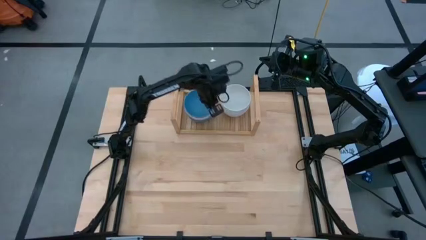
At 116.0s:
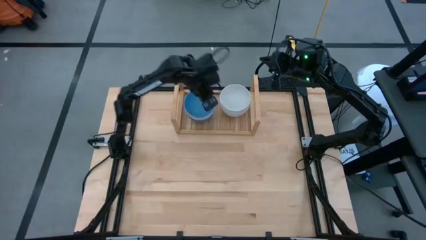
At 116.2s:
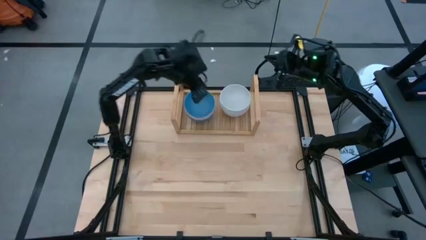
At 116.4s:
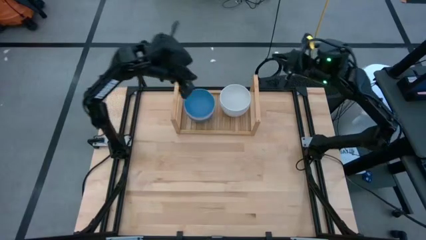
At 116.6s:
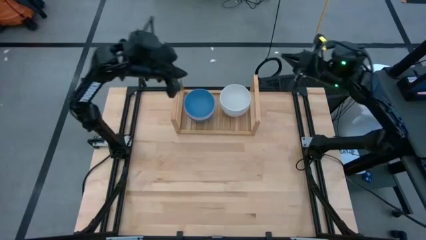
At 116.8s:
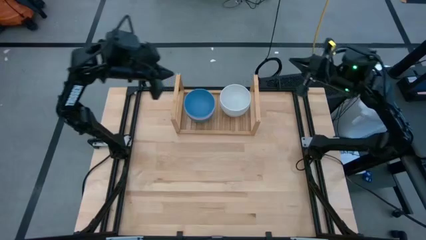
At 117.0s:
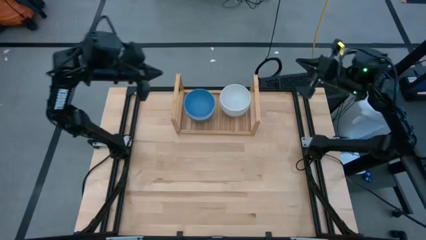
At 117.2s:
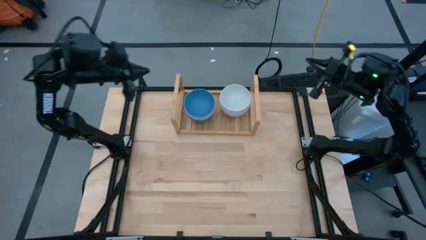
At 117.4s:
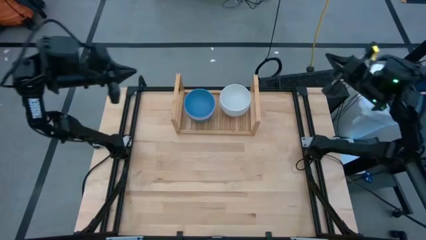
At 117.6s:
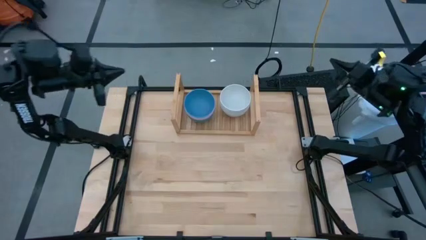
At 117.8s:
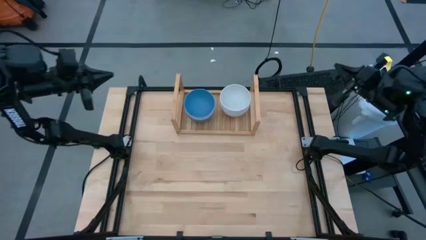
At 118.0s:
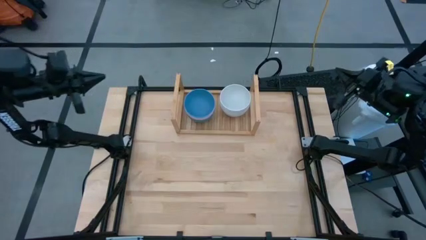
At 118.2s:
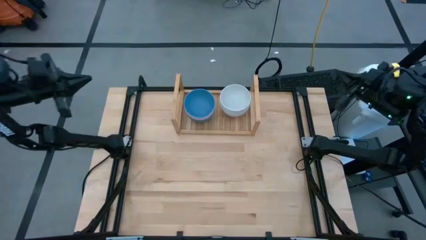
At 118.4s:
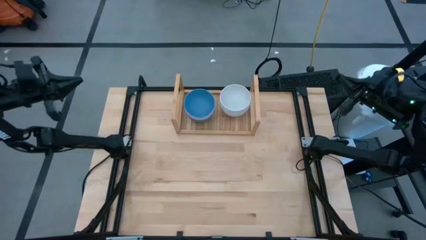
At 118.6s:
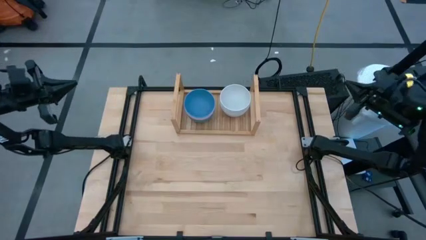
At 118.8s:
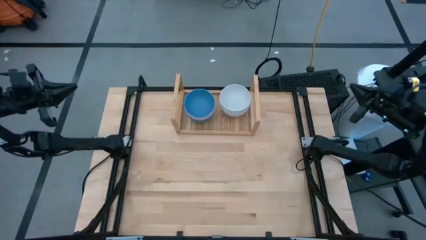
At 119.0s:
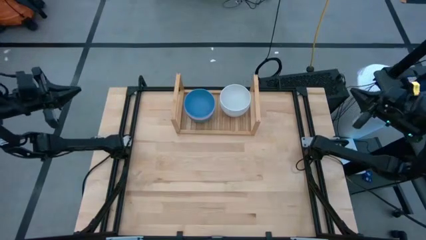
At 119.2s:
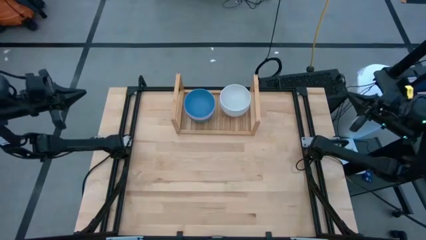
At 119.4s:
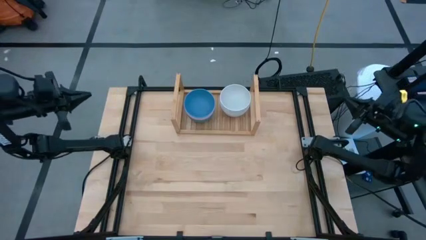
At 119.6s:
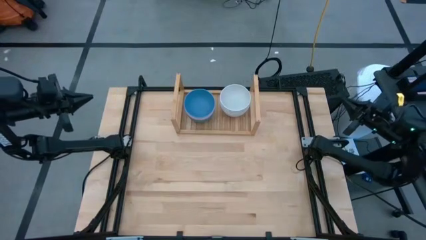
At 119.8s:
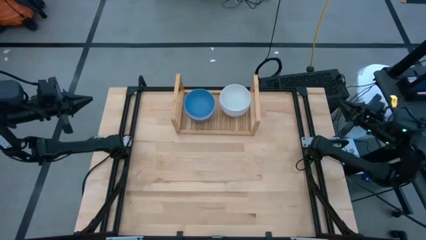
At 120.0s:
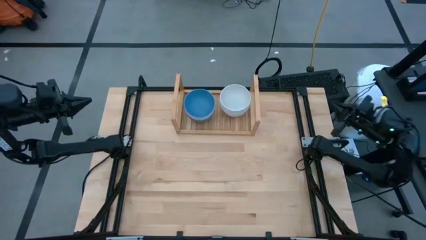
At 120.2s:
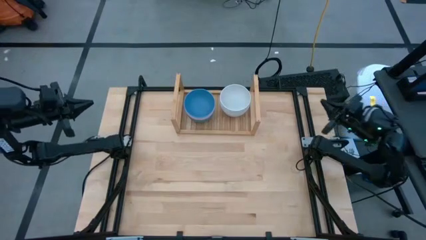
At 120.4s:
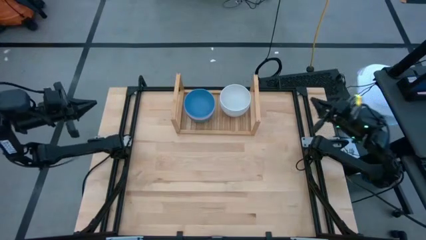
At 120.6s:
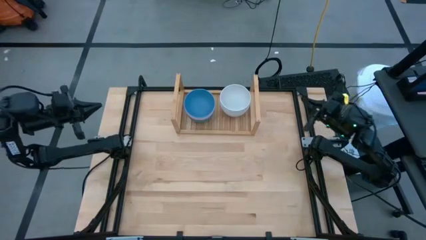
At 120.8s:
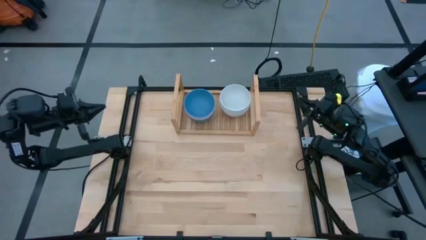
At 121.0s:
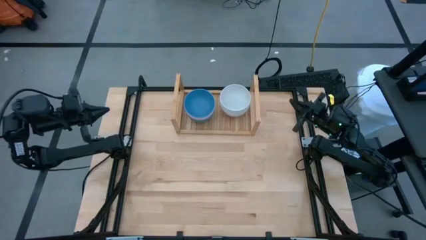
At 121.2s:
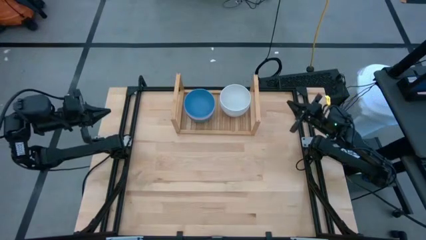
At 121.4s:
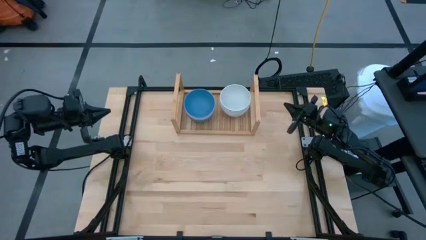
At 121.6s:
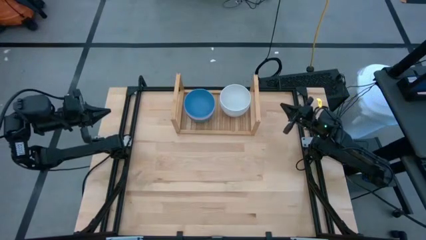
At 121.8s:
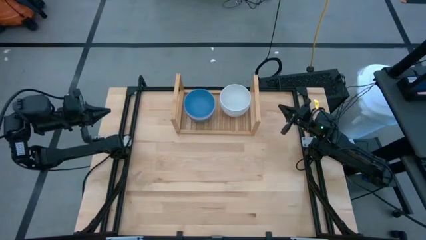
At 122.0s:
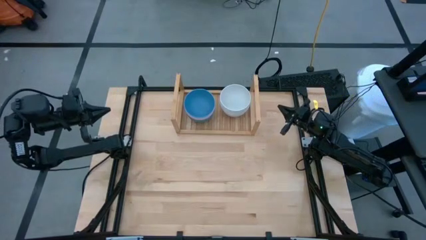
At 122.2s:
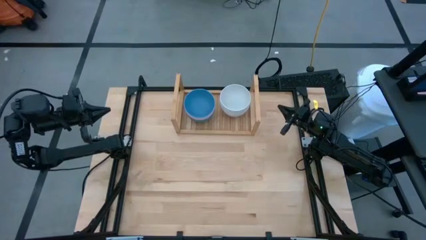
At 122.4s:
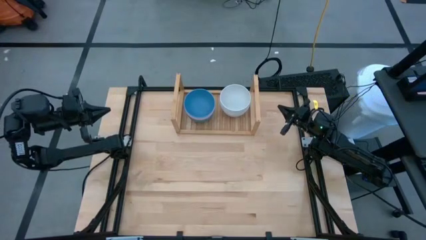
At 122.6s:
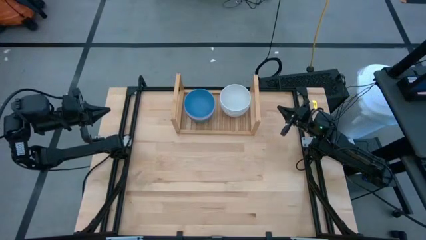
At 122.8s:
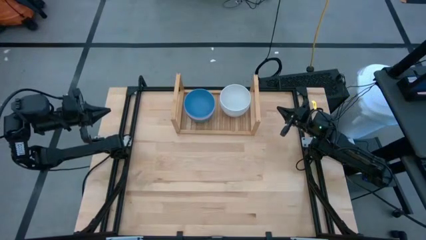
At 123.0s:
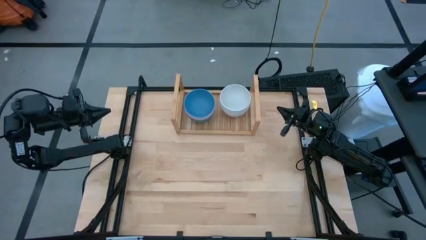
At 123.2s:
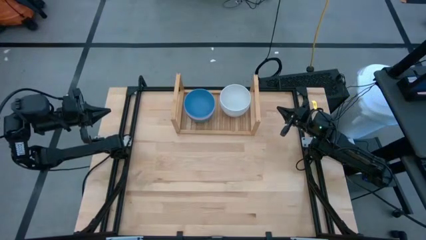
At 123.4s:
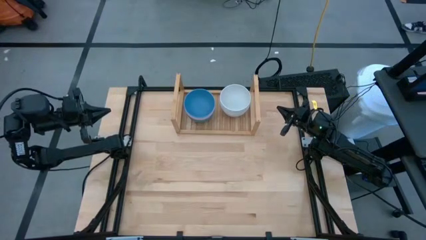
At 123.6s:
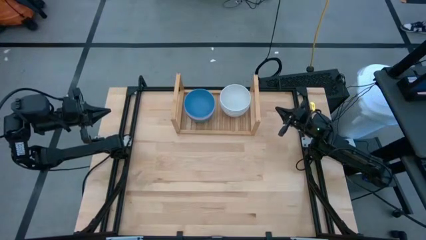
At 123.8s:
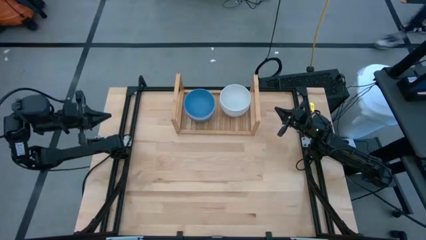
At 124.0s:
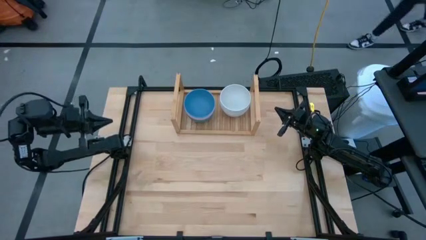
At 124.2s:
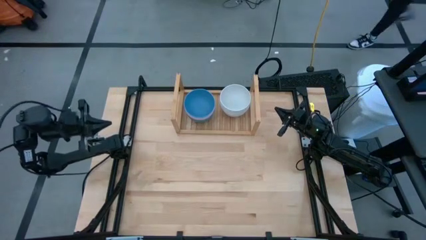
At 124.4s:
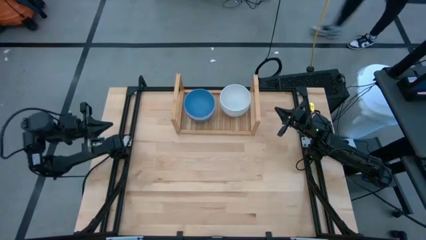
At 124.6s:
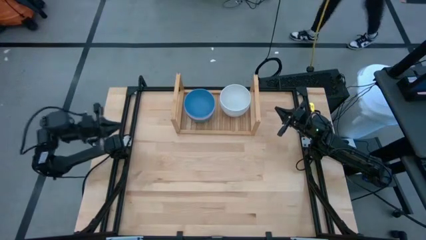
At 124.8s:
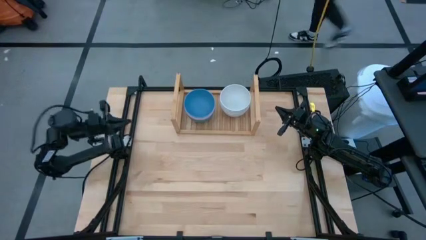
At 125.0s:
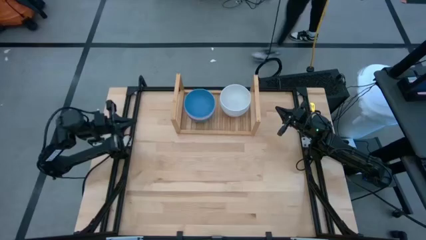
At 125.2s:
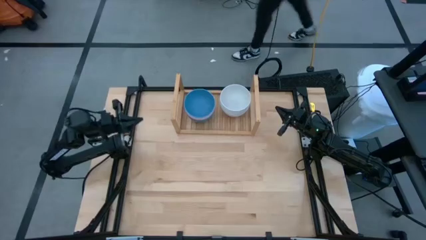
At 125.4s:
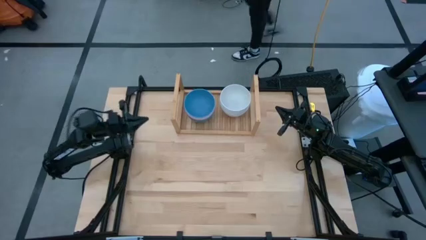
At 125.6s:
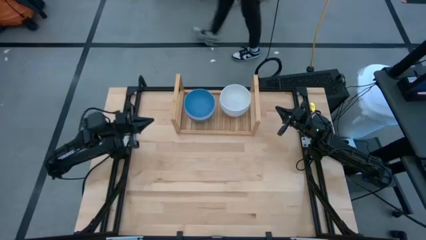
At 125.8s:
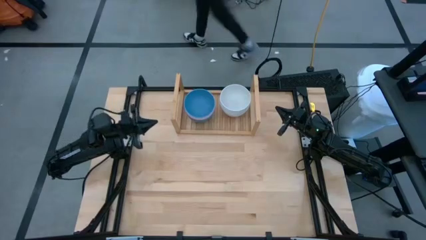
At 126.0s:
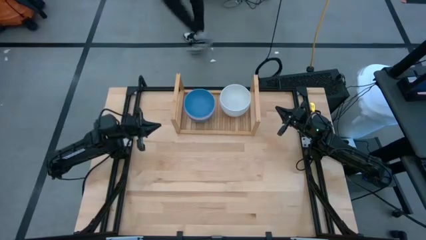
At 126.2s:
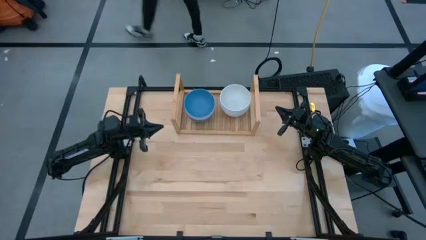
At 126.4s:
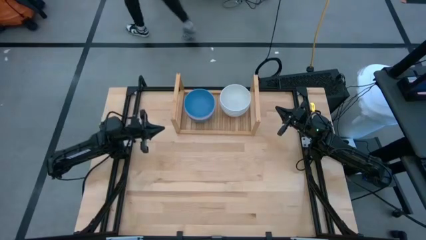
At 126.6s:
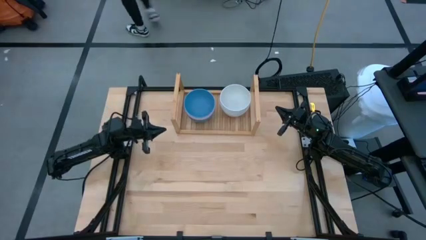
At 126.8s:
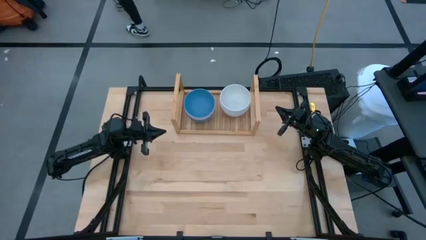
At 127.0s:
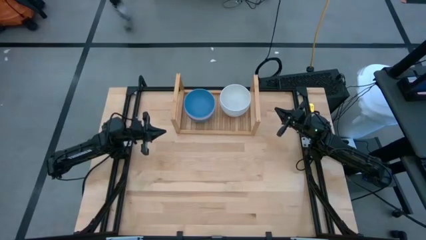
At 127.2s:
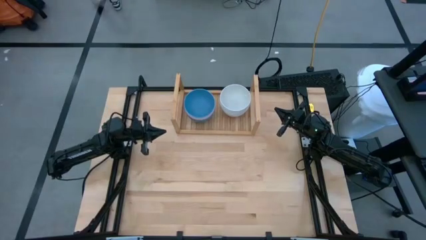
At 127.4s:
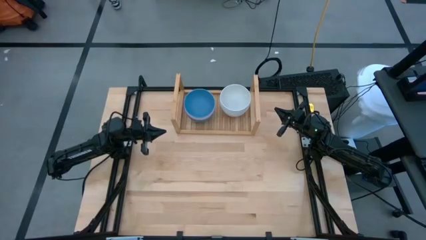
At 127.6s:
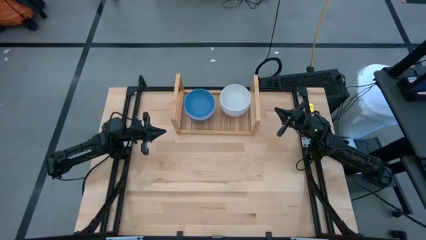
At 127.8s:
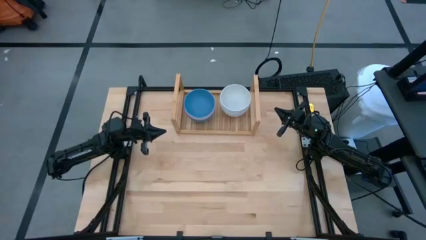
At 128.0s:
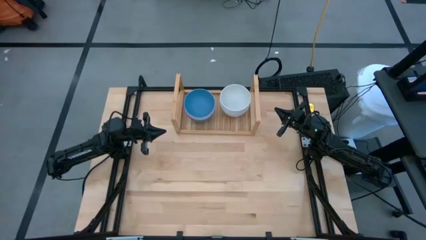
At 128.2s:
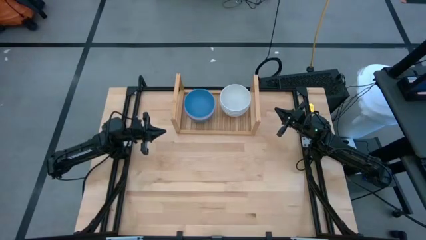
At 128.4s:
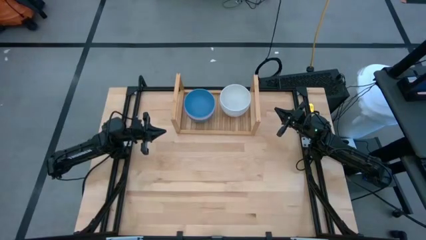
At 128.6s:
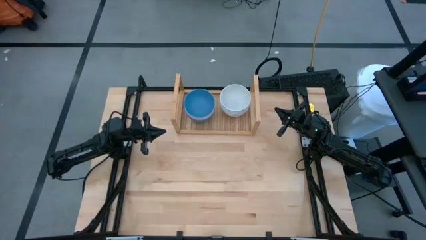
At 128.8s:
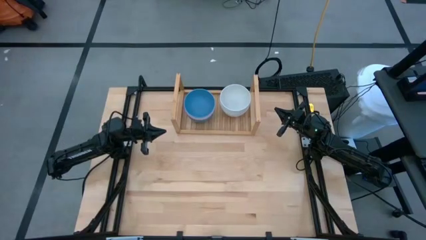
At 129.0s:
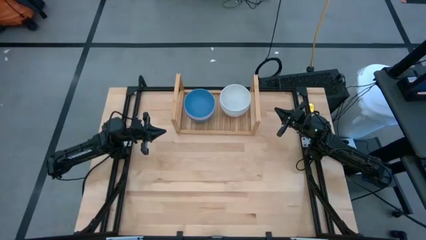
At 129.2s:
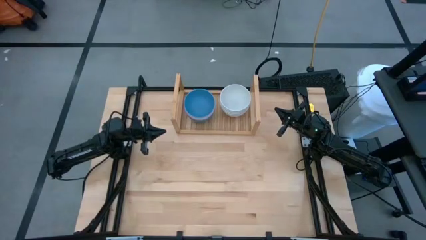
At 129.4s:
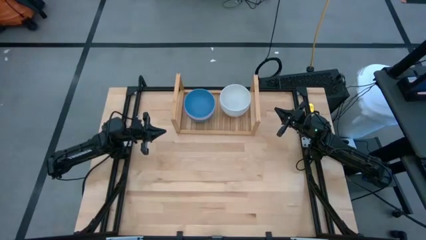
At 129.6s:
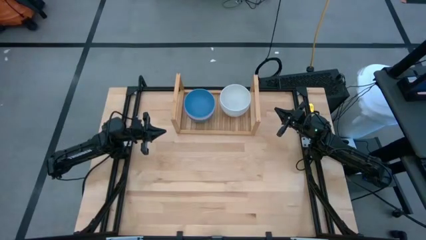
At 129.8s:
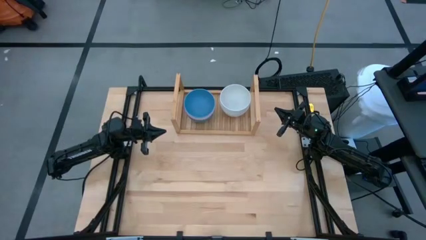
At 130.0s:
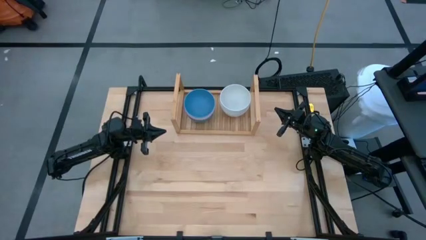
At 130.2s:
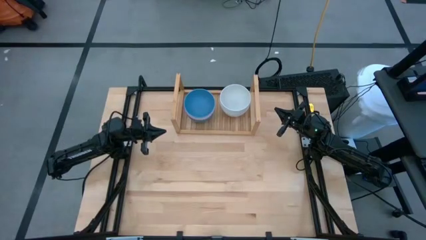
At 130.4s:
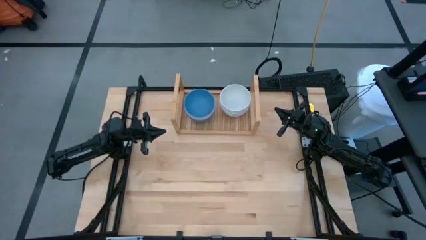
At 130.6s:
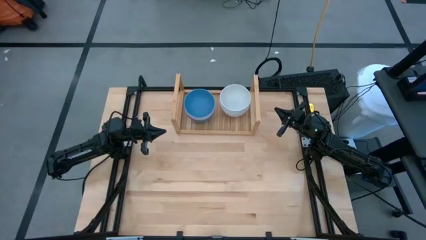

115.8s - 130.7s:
Task: Place and stack bowls onto a shelf
Return to Home Position
